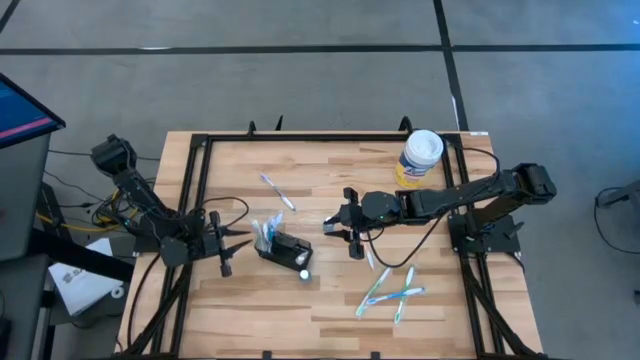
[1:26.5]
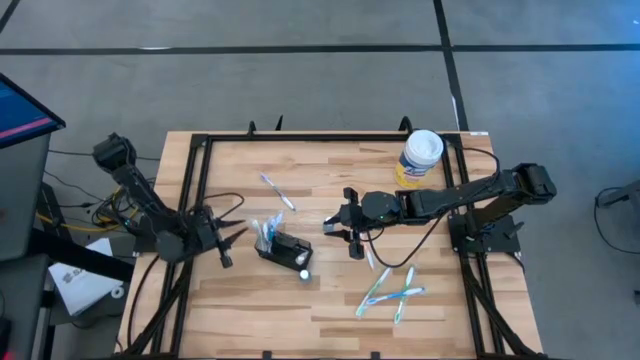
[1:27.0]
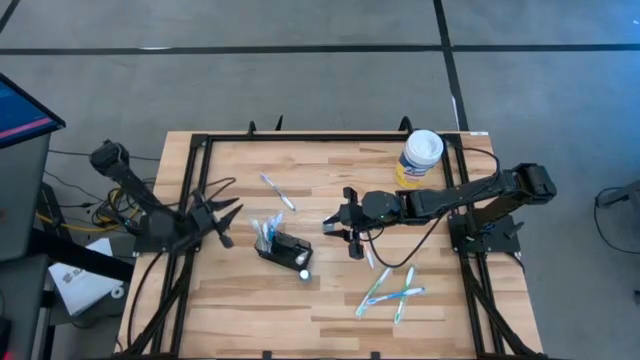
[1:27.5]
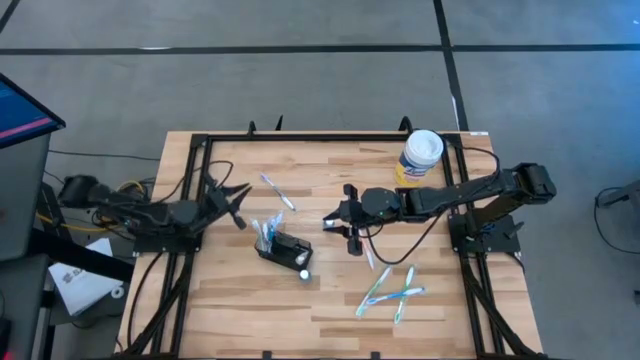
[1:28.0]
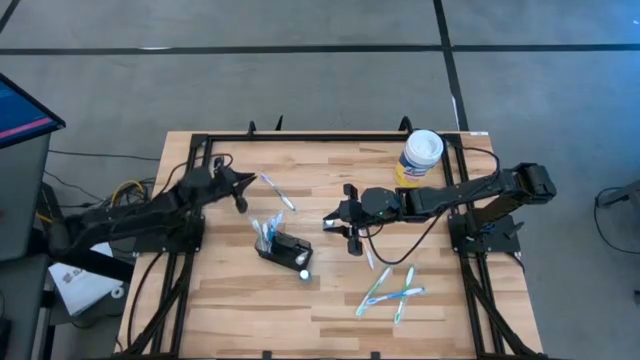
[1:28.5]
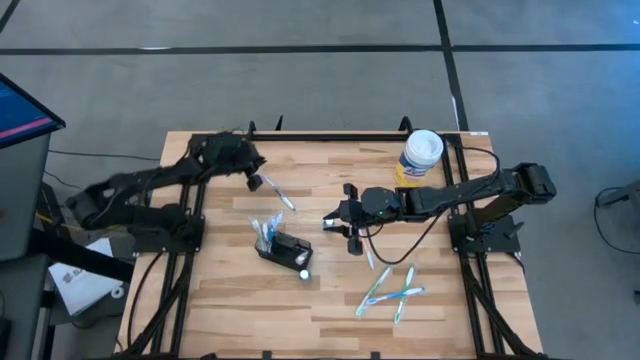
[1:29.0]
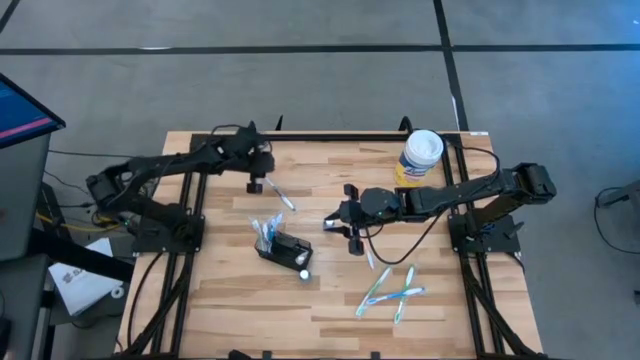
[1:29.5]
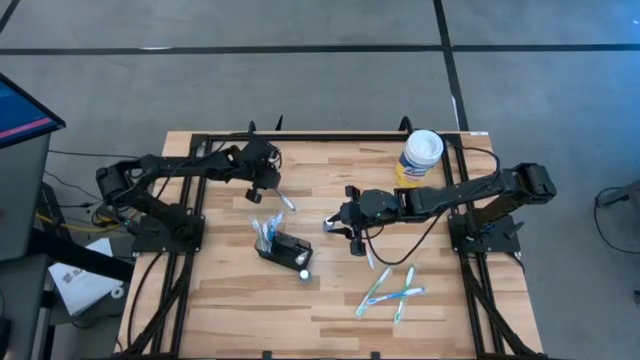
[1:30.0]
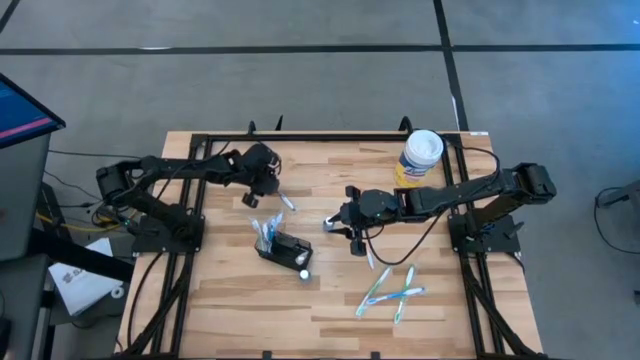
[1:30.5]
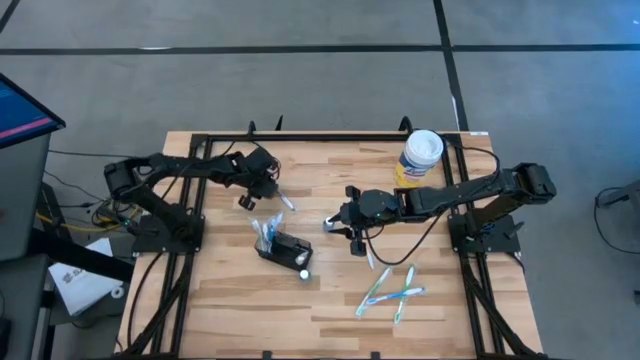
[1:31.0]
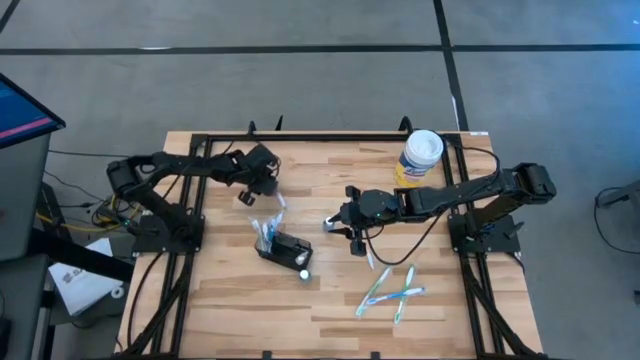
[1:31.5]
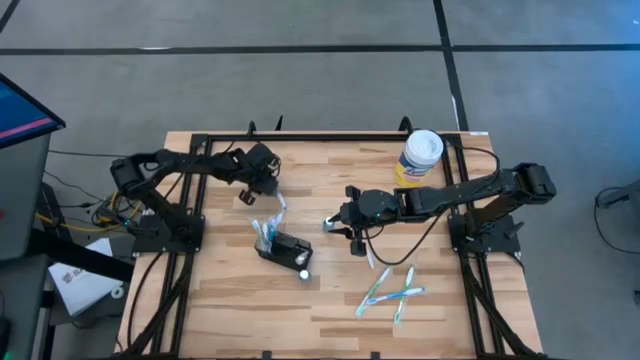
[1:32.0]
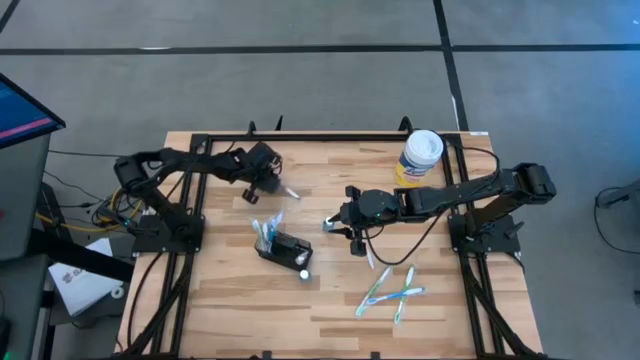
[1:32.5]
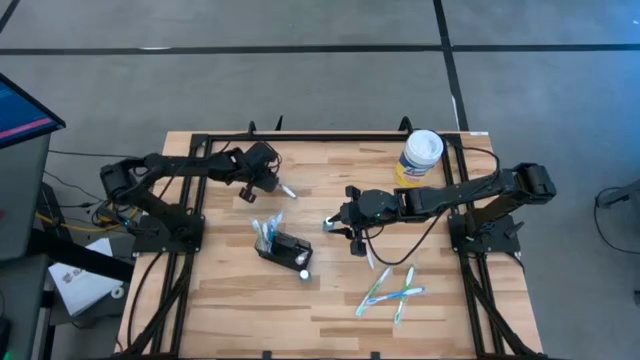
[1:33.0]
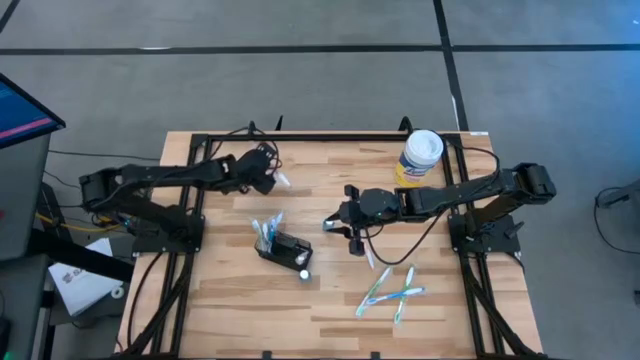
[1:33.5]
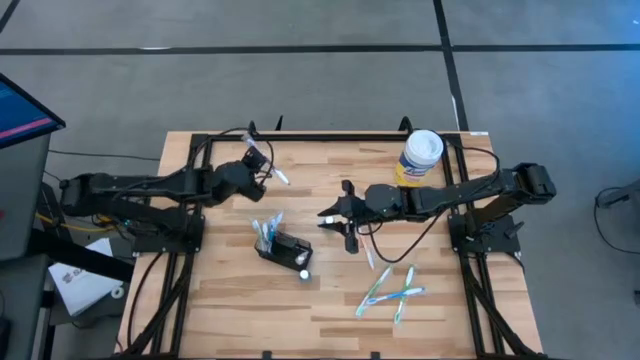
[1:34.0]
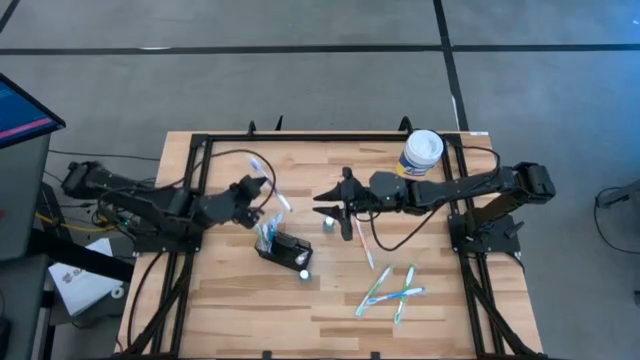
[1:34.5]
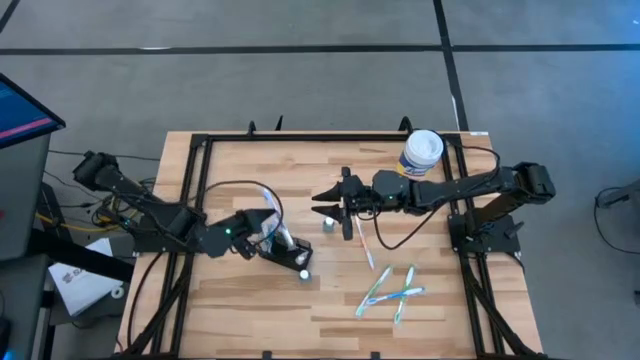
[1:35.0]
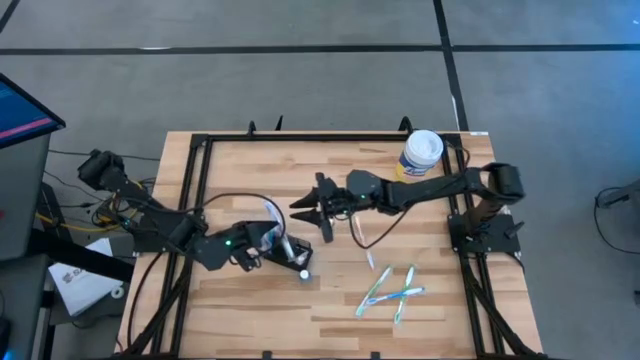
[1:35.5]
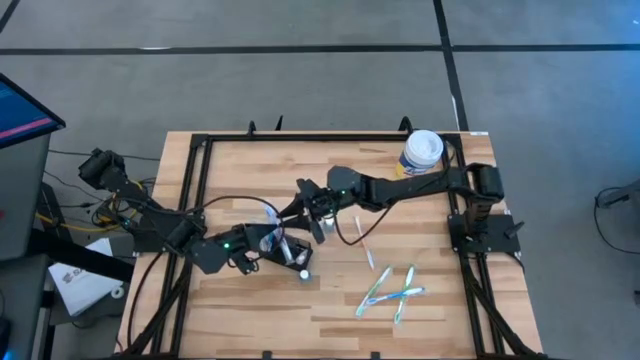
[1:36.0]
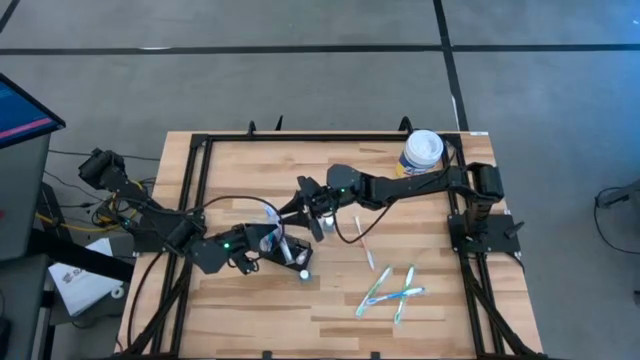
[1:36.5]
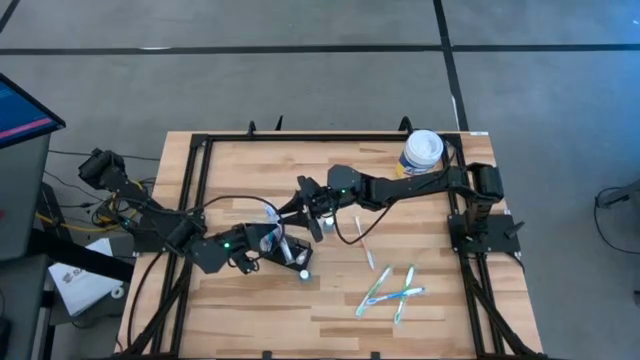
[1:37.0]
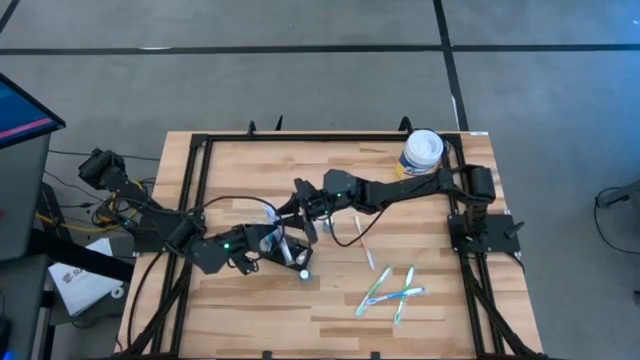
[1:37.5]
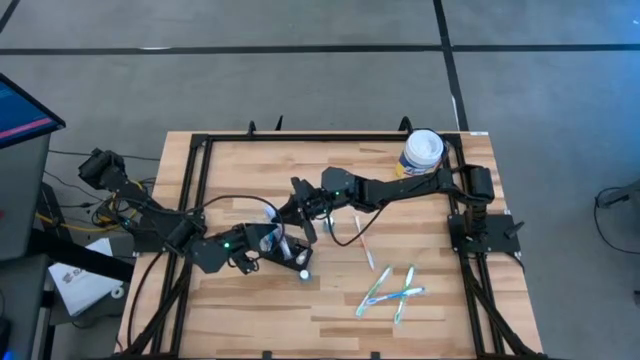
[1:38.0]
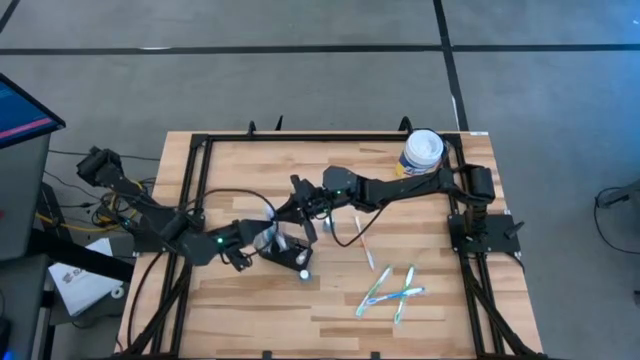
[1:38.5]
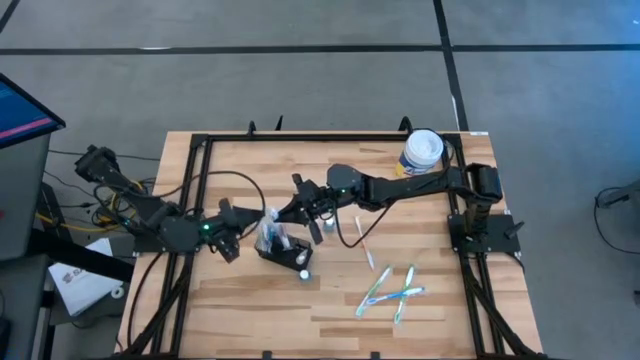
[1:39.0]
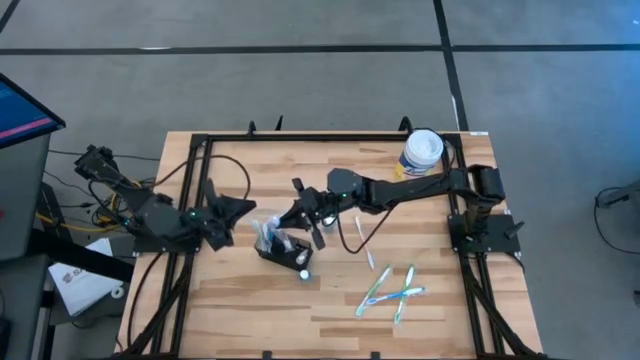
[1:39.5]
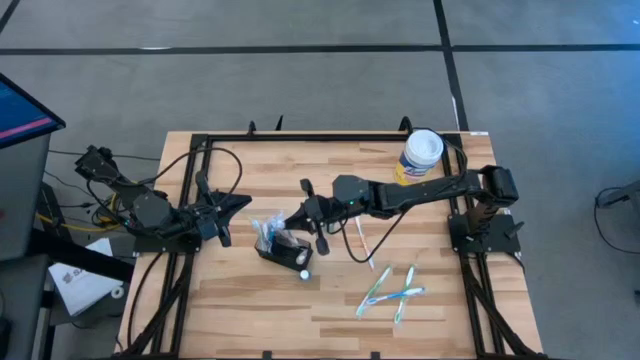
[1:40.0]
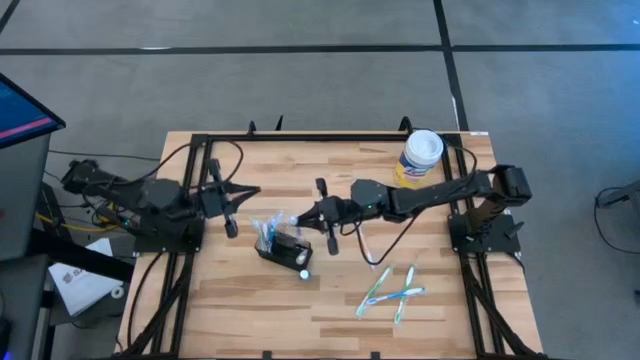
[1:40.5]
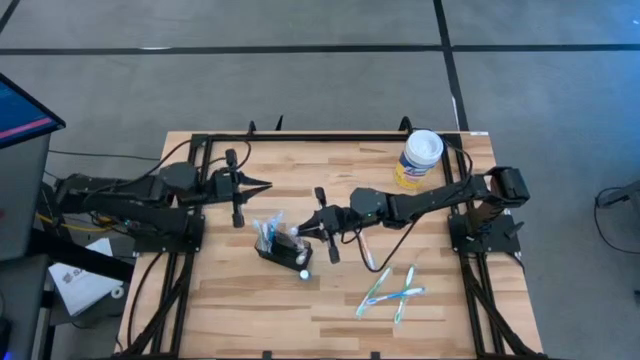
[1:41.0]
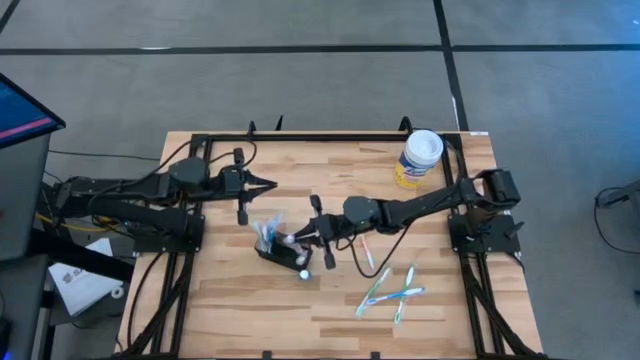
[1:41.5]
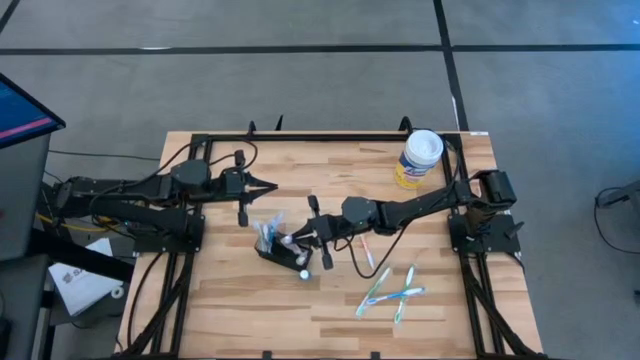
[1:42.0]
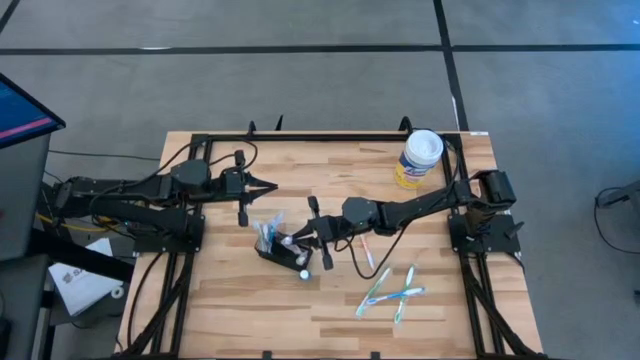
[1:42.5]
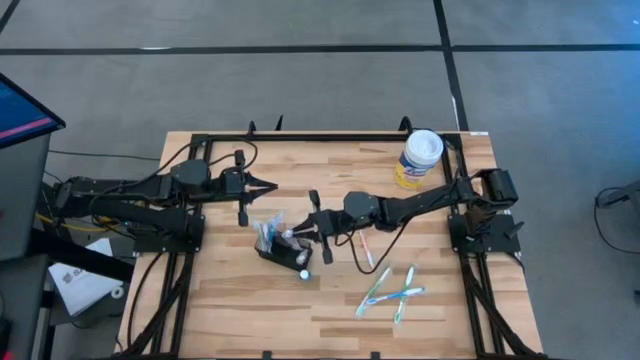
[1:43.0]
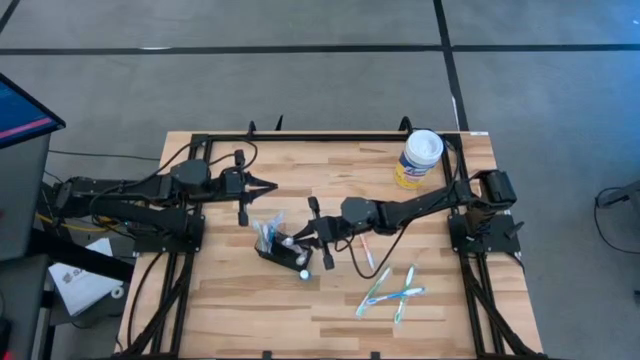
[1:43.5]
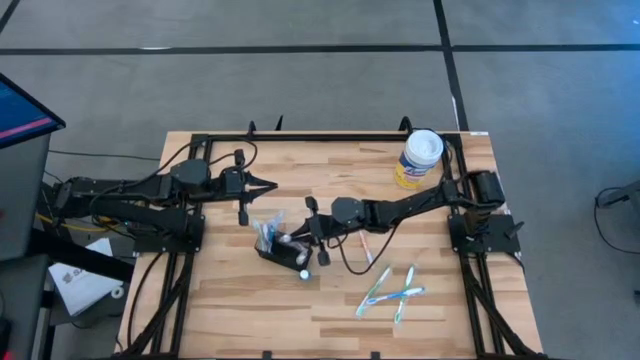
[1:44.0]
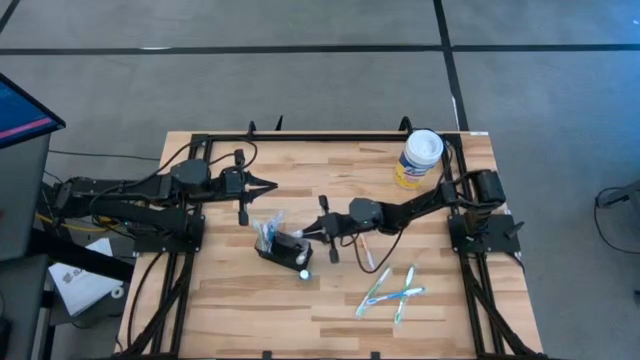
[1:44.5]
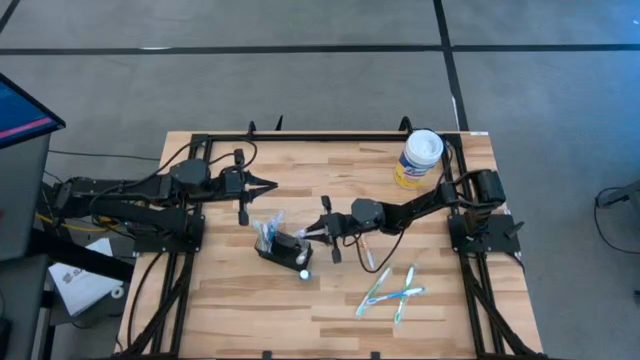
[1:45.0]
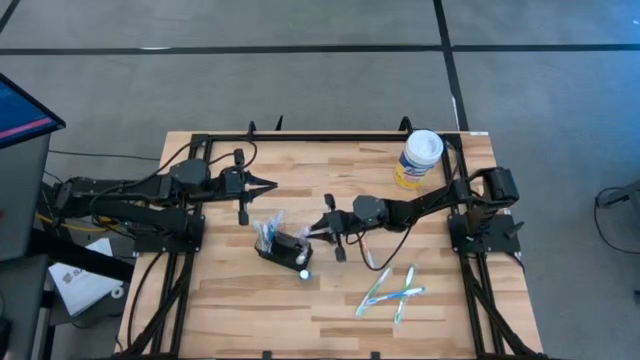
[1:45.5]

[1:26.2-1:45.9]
Task: Pick & Place toothbrushing station
Put the purple toothbrush into the right compartment of the wire organizer

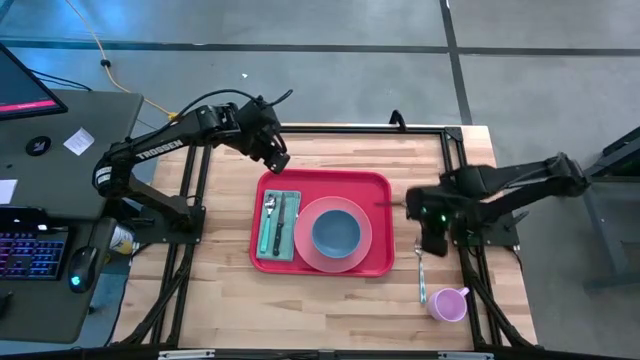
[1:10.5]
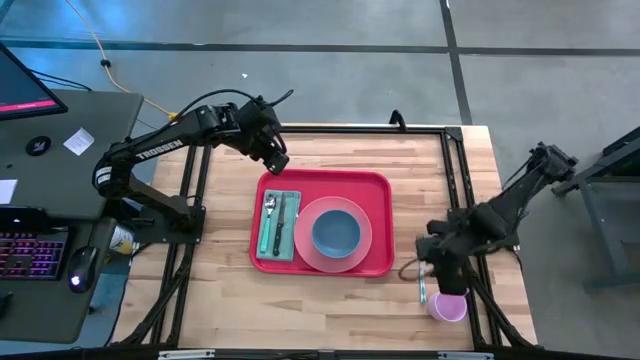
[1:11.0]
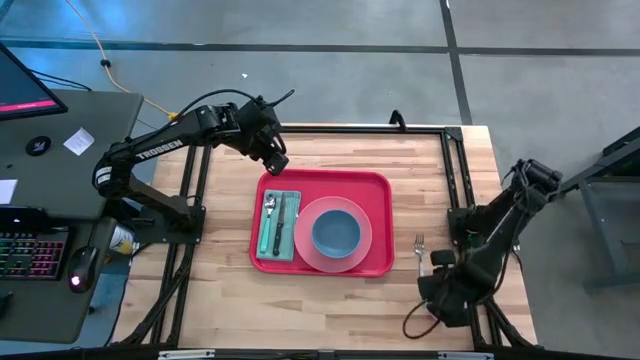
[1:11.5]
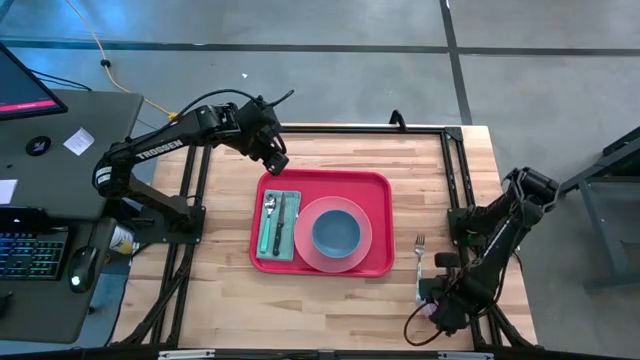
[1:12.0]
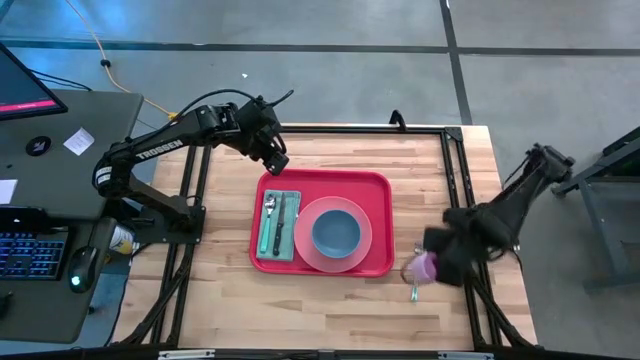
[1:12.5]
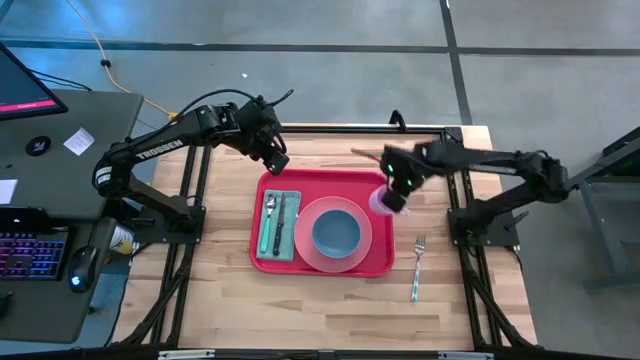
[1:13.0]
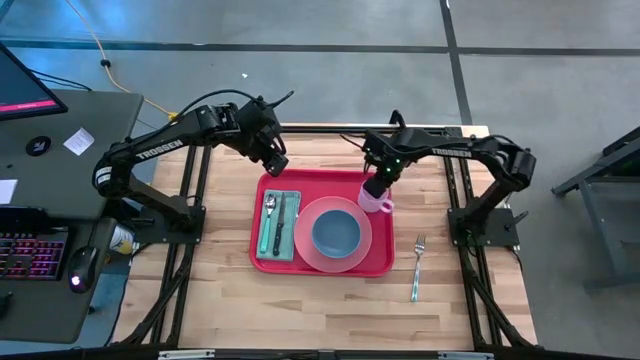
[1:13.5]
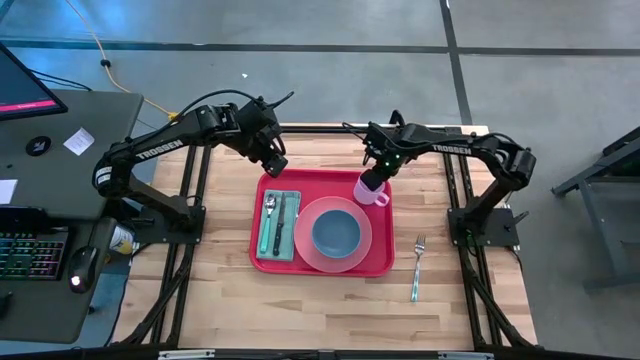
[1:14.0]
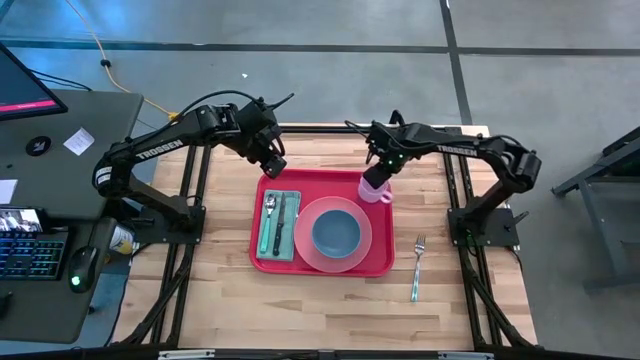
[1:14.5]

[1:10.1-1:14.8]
Task: Set up tray
Put the pink mug on the top right of the red tray
